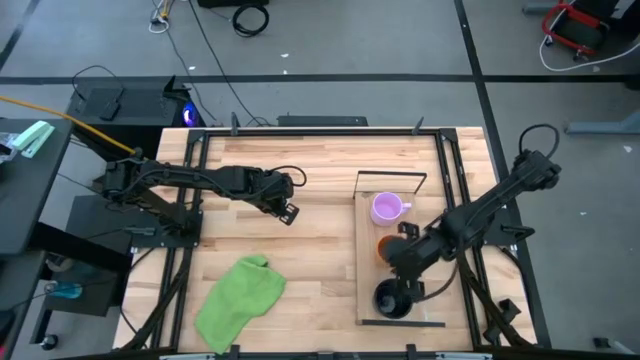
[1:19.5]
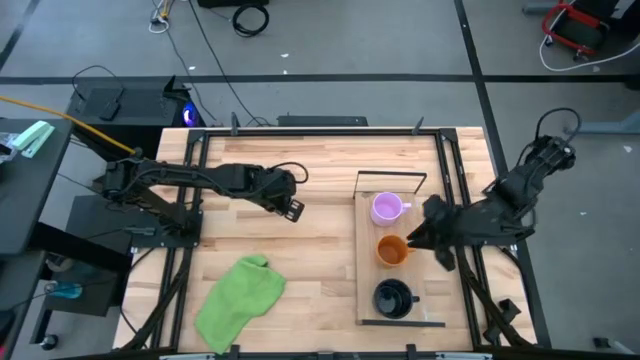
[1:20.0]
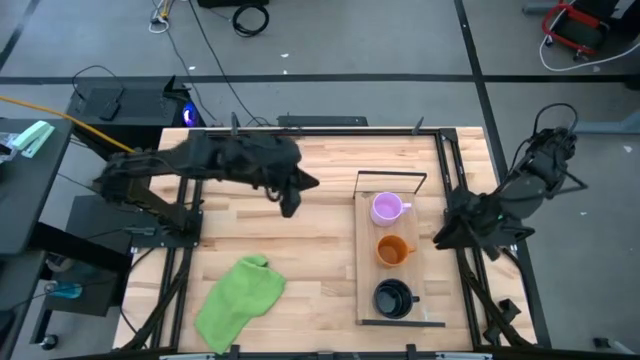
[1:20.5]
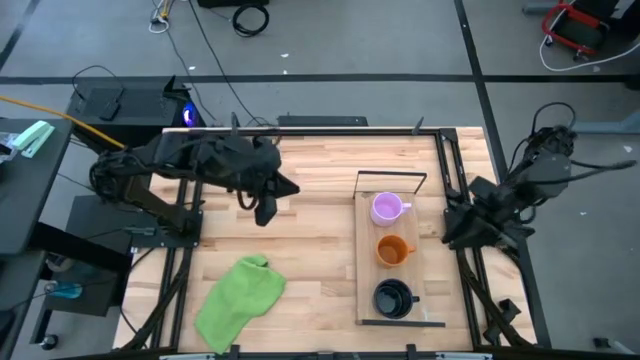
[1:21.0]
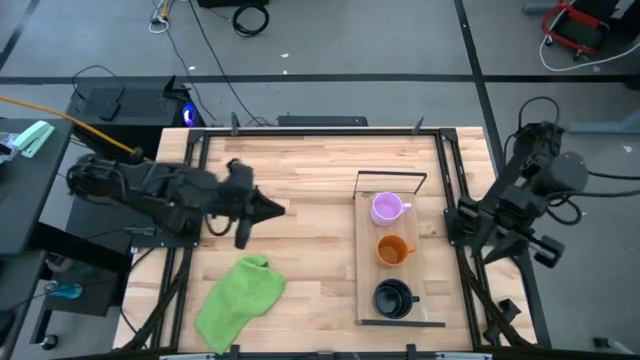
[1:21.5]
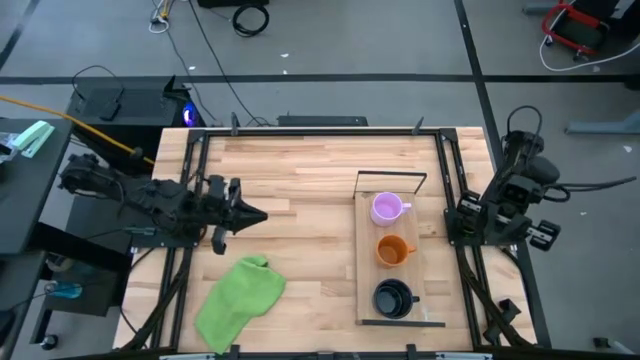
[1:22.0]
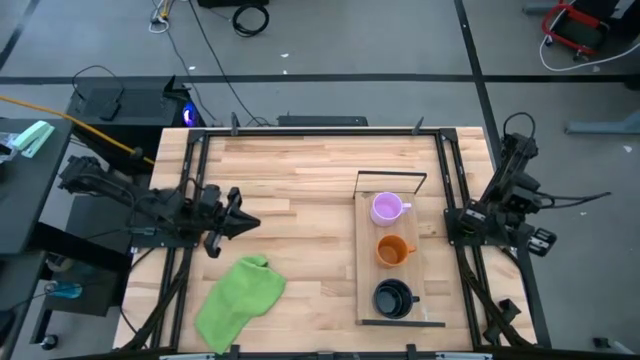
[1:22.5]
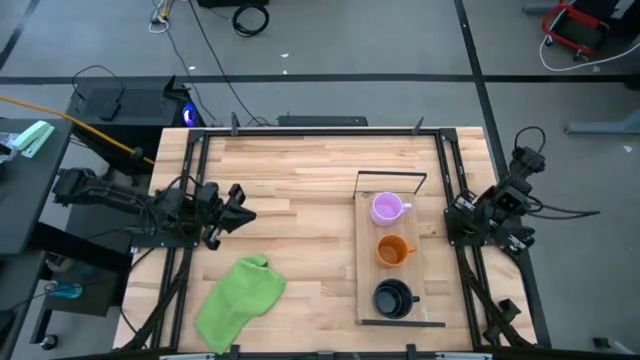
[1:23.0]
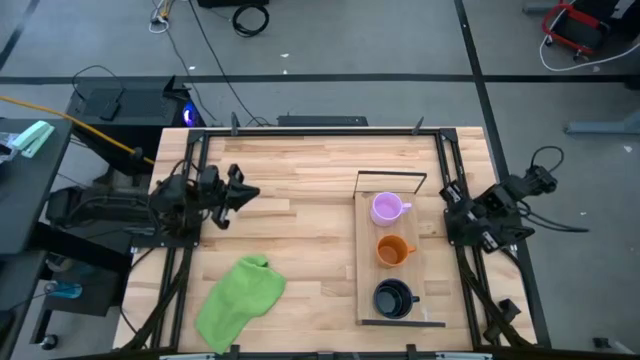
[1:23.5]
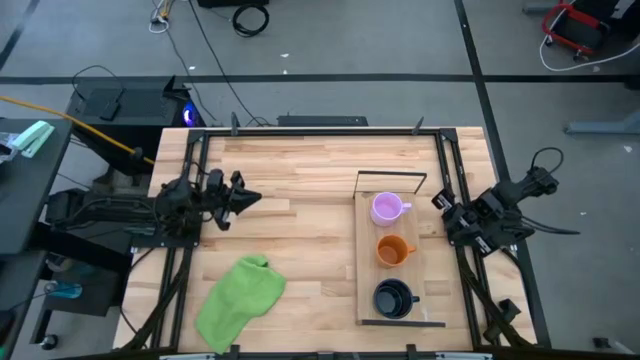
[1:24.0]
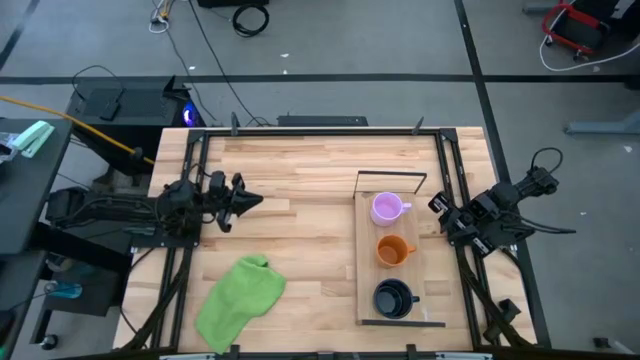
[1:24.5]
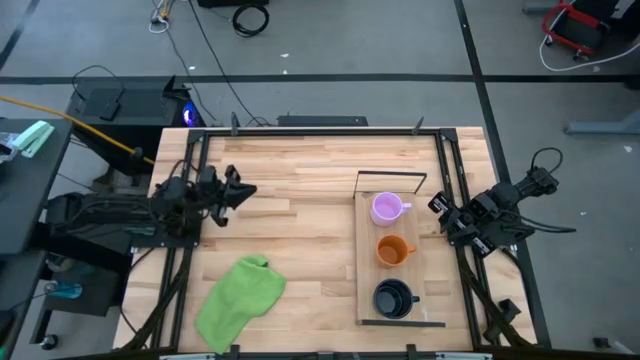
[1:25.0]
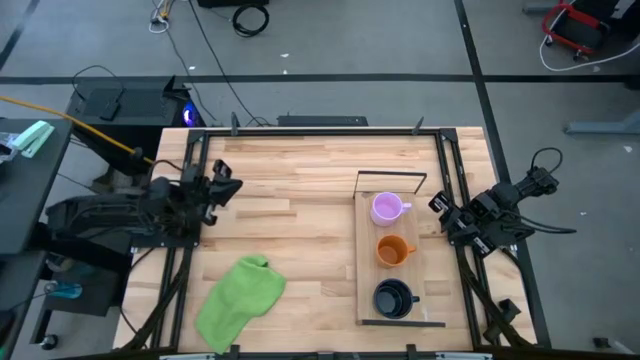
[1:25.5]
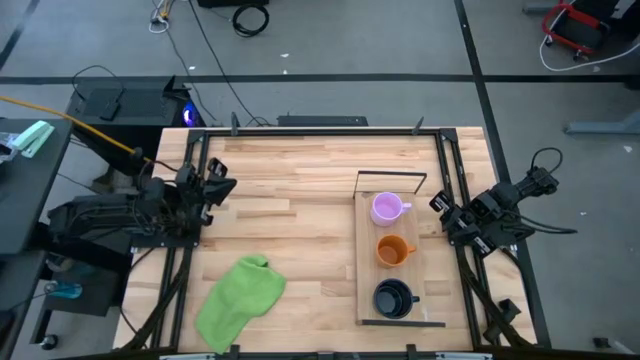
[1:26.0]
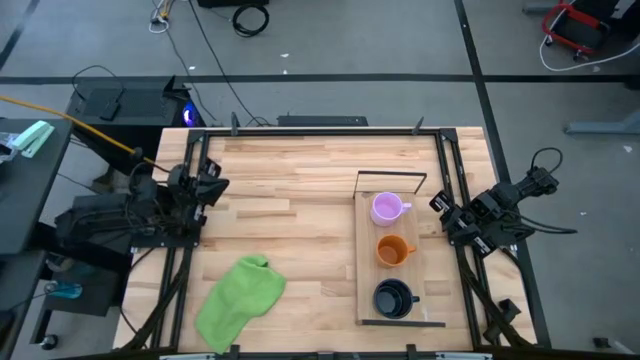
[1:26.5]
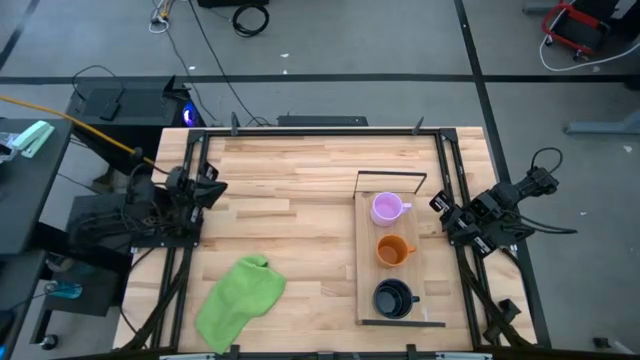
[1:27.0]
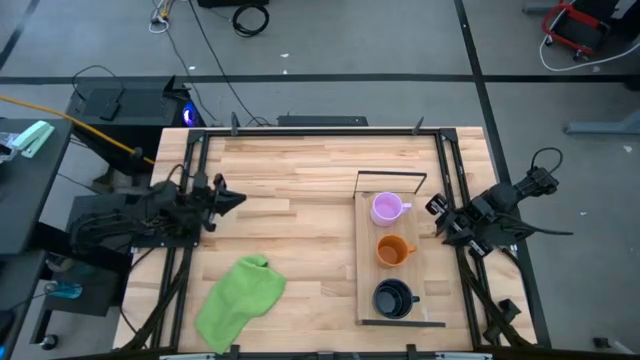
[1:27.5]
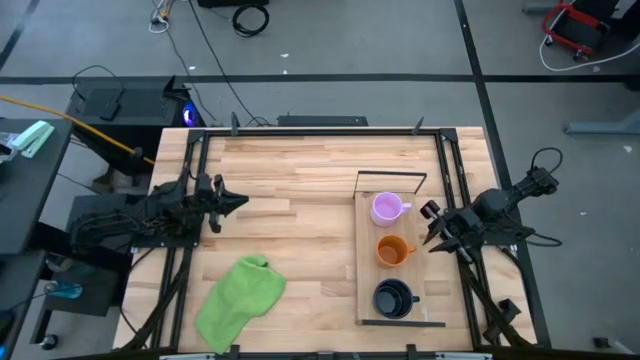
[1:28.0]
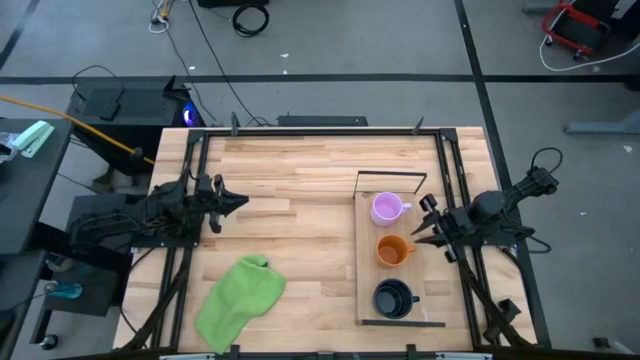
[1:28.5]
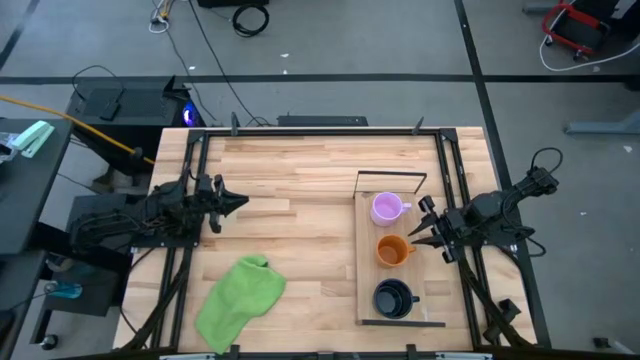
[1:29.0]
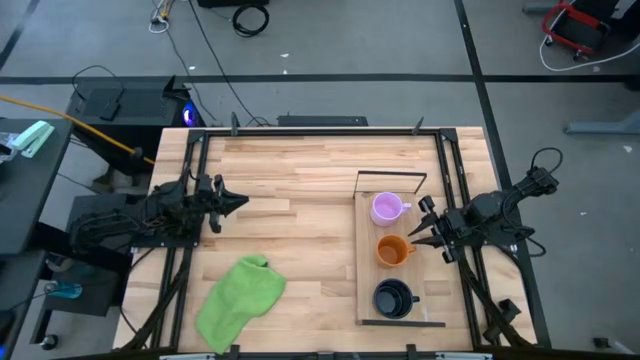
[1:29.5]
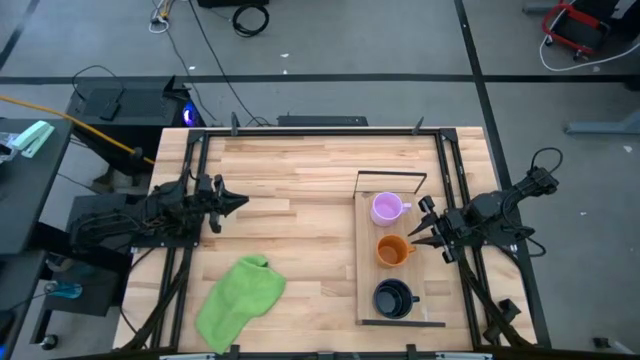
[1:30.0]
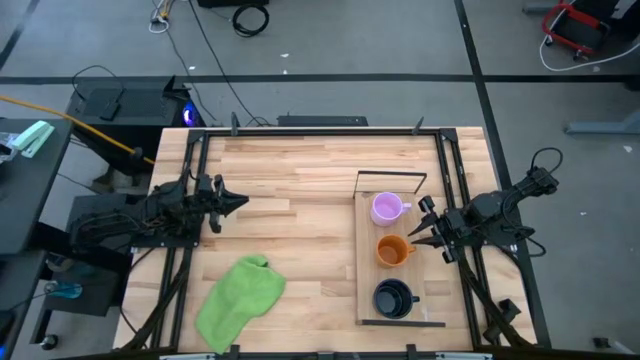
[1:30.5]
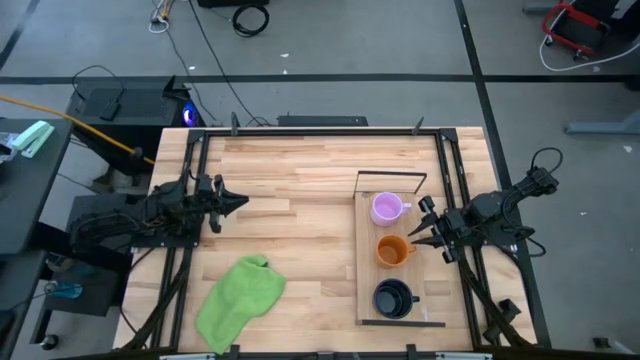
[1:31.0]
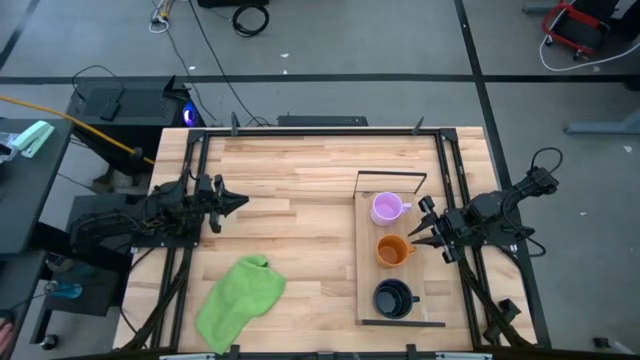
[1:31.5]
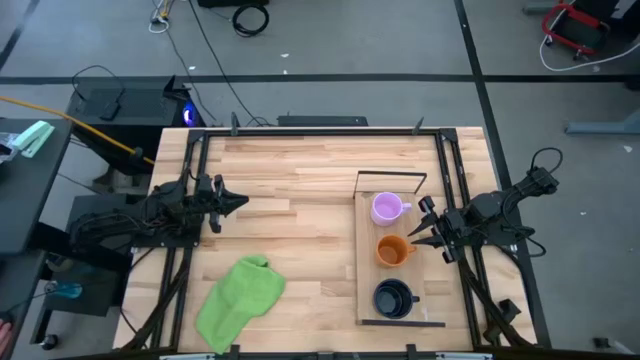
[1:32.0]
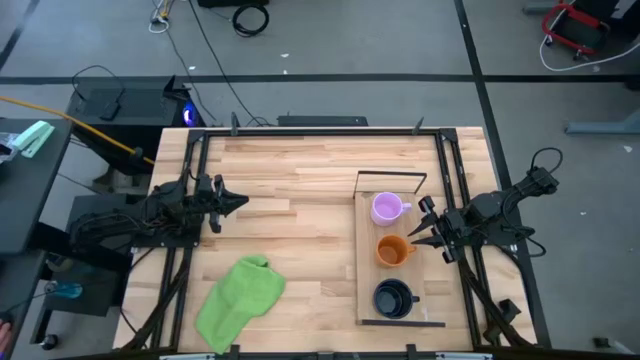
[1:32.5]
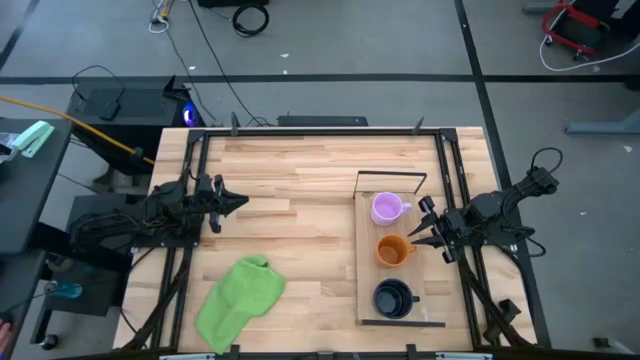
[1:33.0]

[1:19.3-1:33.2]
Task: Stack small to large cups/mugs on shelf
Return to Home Position

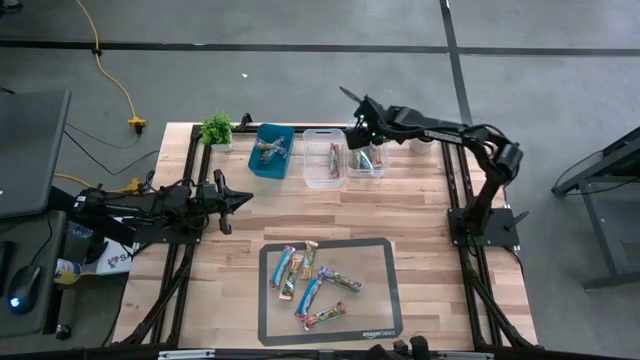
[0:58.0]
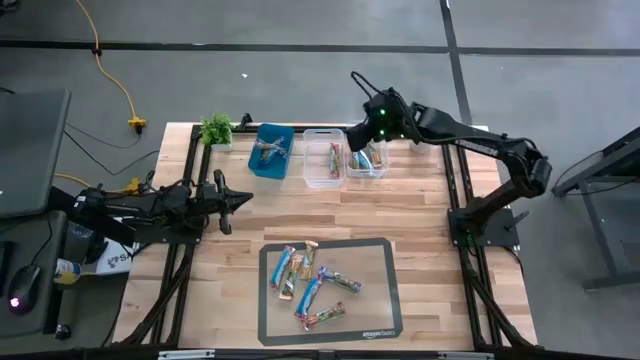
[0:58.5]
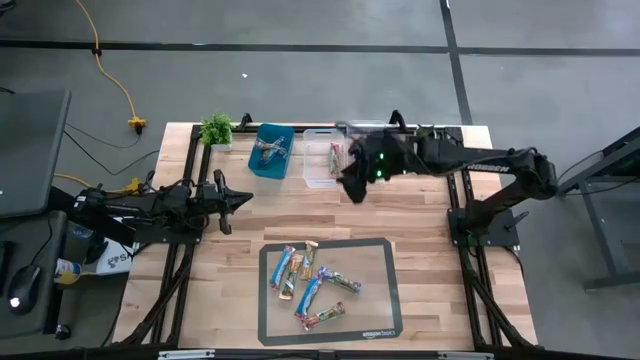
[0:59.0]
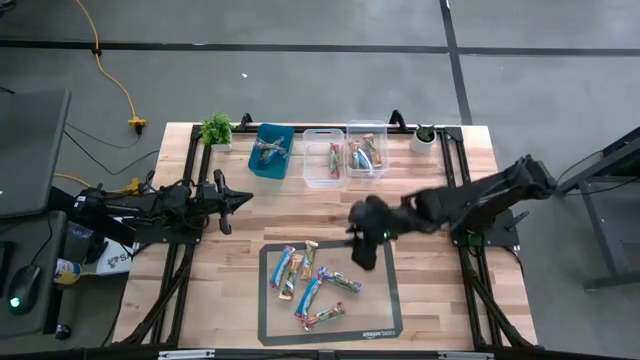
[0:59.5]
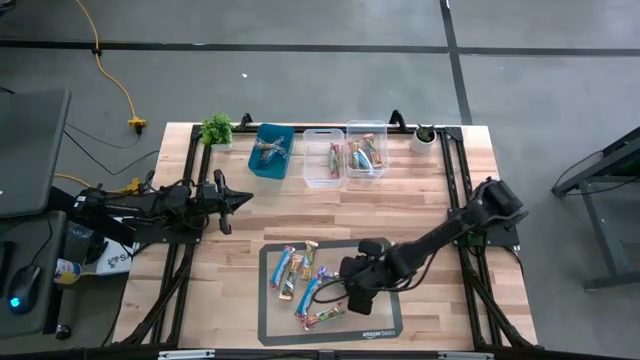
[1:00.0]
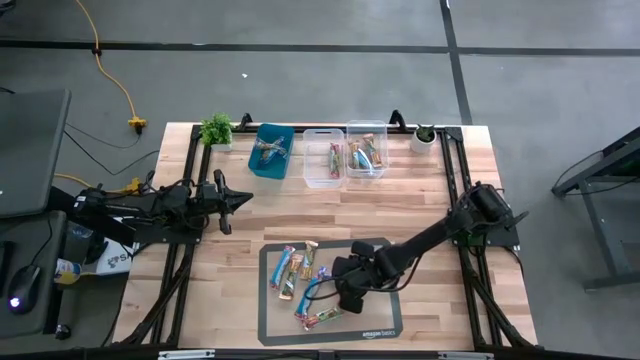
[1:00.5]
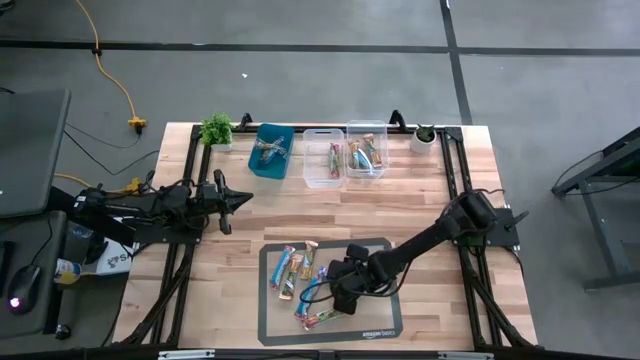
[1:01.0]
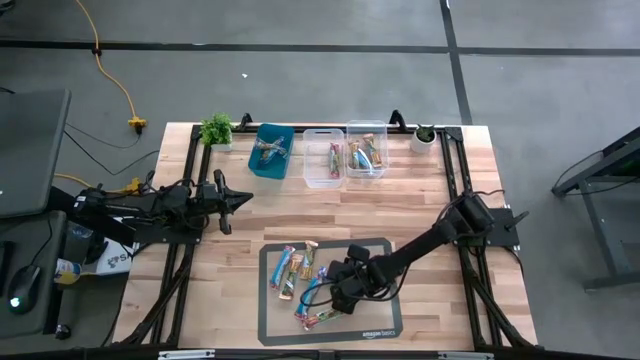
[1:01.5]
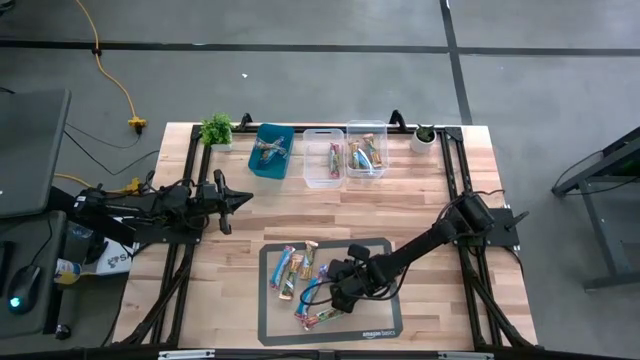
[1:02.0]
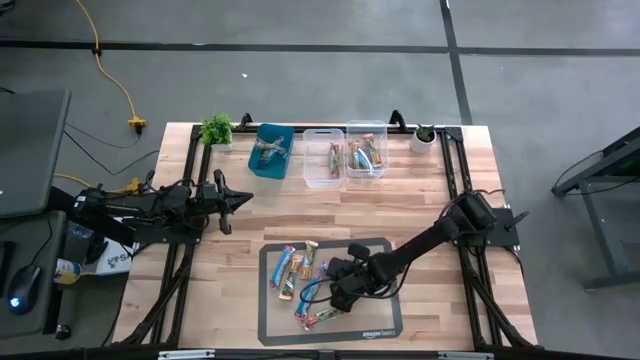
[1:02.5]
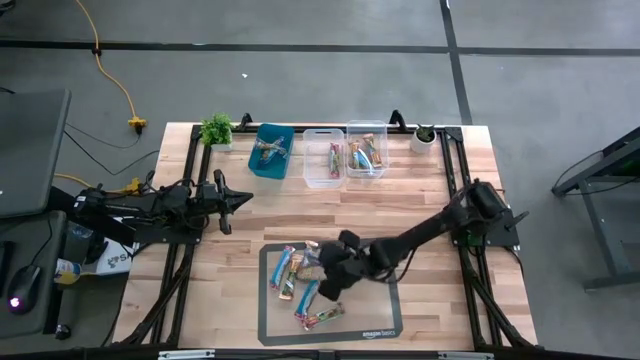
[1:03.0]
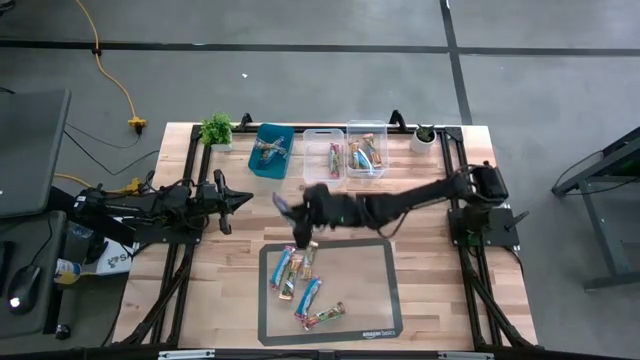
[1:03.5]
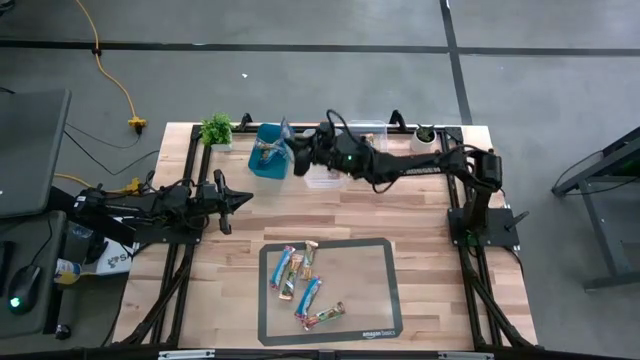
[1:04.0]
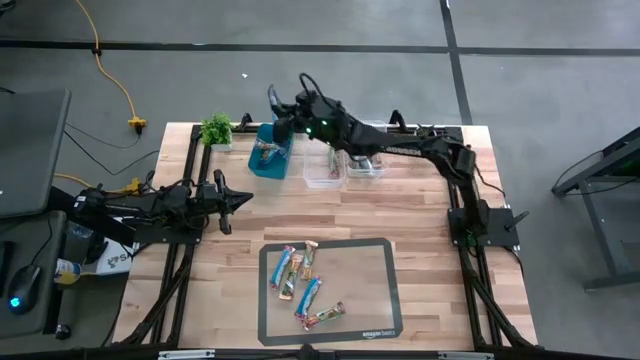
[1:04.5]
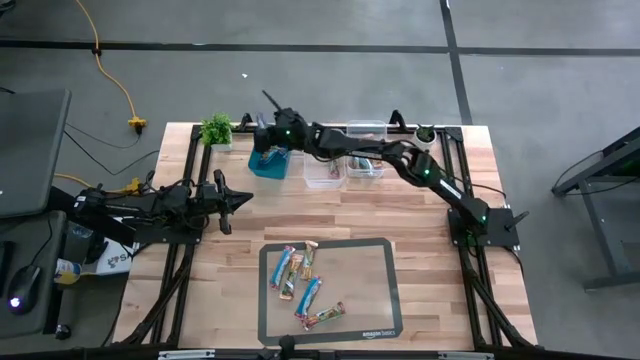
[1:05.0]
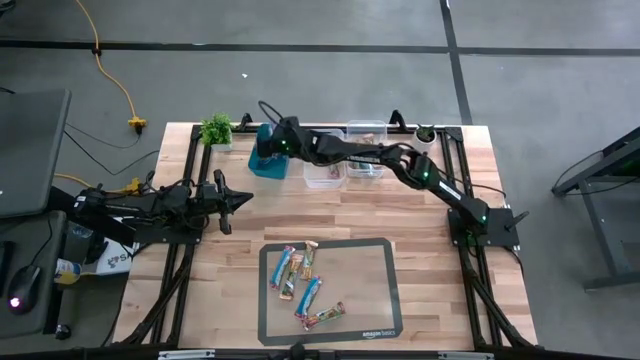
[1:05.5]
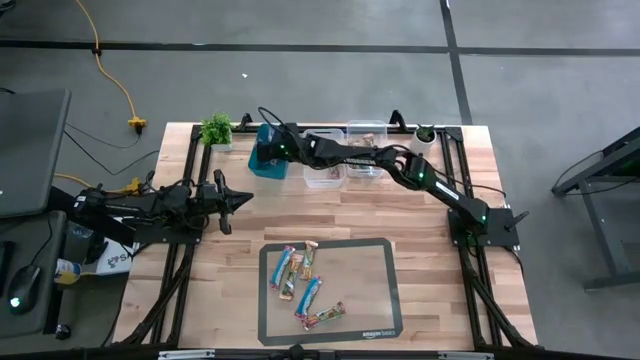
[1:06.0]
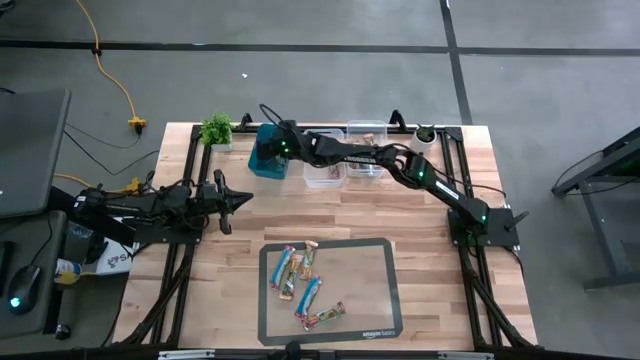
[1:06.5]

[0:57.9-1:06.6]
Task: Pick and place Granola Bars by type
Put the blue granola bar into the blue bin
